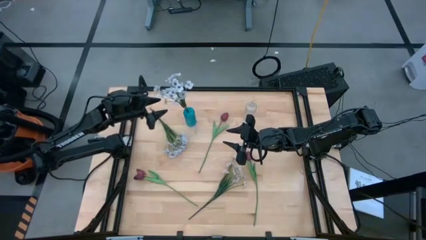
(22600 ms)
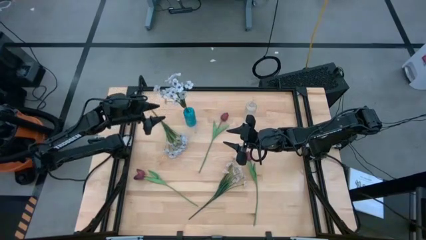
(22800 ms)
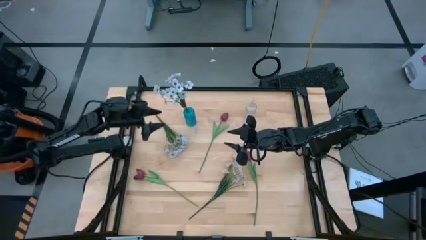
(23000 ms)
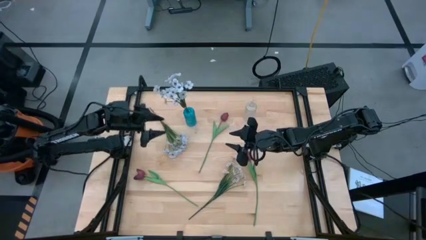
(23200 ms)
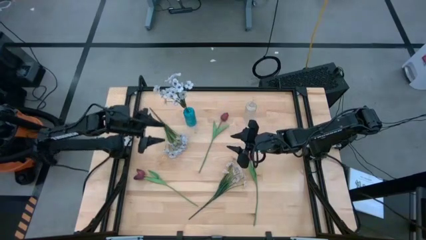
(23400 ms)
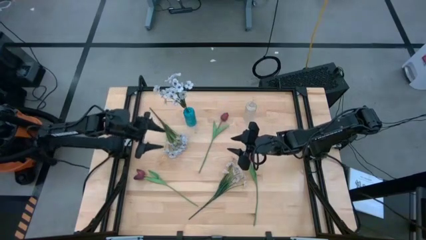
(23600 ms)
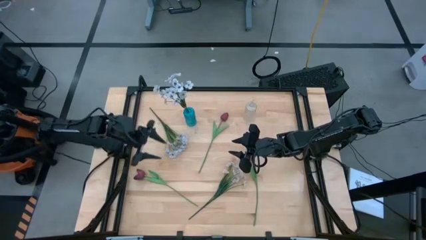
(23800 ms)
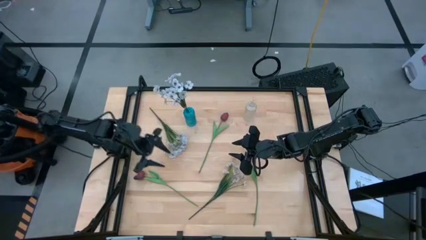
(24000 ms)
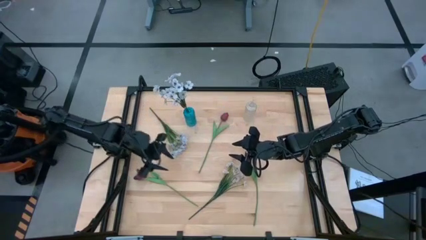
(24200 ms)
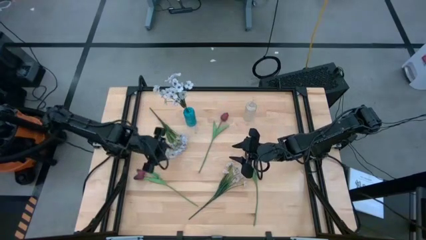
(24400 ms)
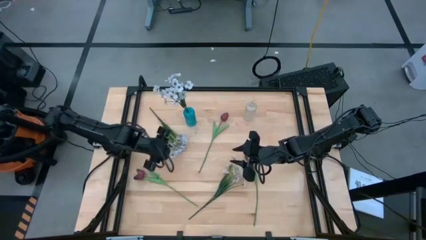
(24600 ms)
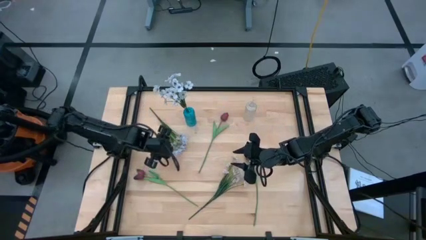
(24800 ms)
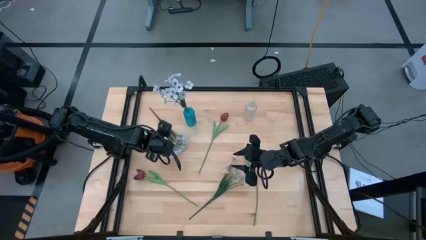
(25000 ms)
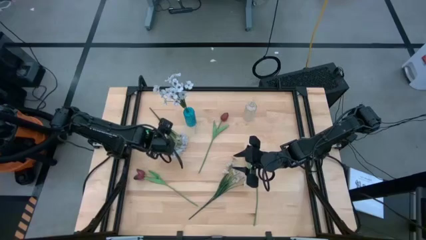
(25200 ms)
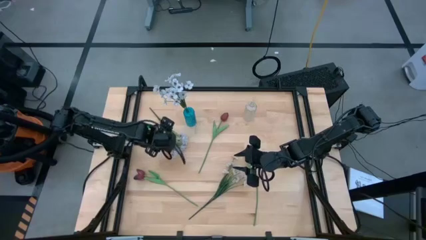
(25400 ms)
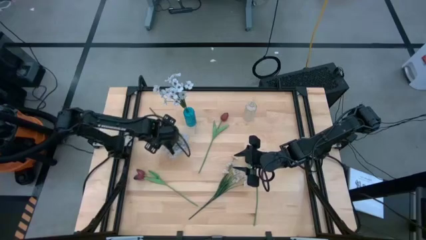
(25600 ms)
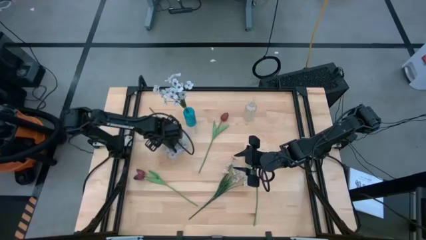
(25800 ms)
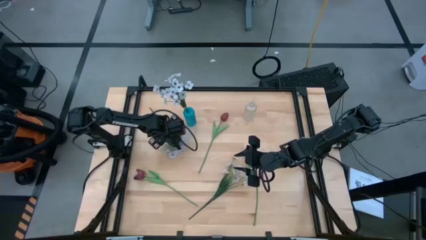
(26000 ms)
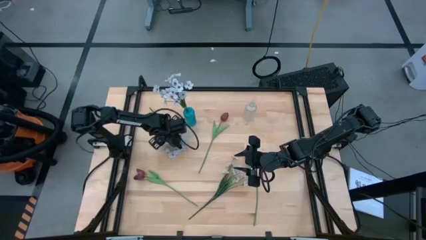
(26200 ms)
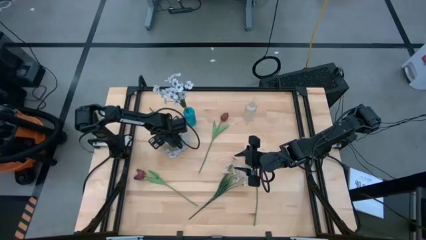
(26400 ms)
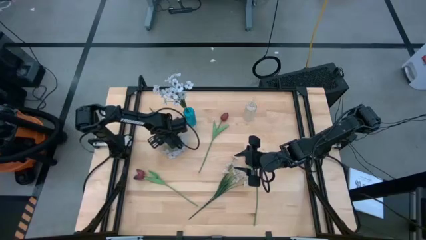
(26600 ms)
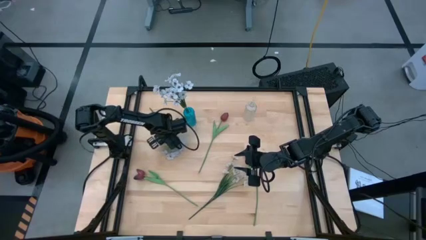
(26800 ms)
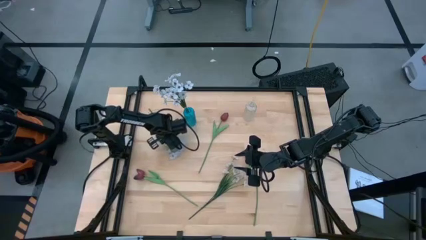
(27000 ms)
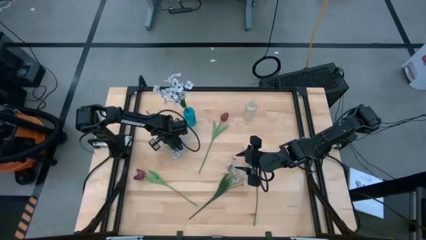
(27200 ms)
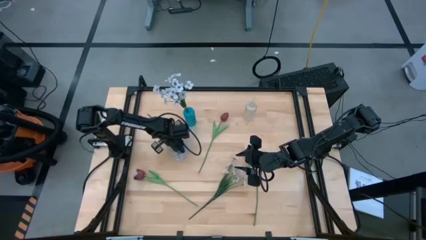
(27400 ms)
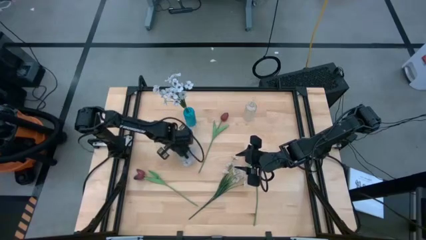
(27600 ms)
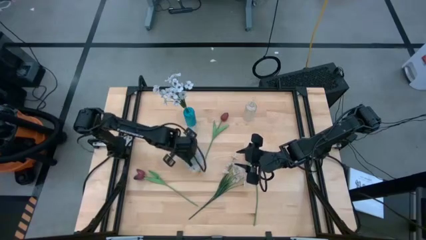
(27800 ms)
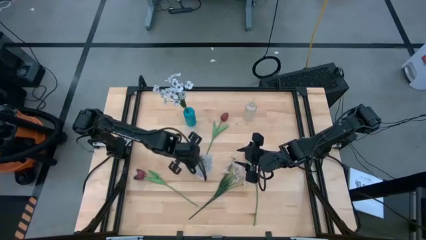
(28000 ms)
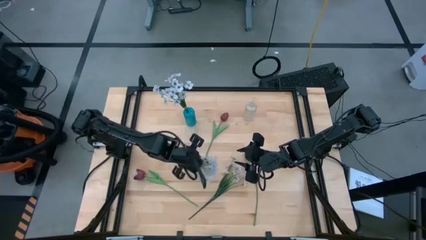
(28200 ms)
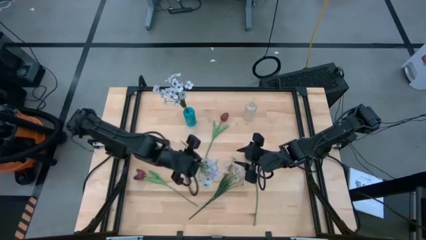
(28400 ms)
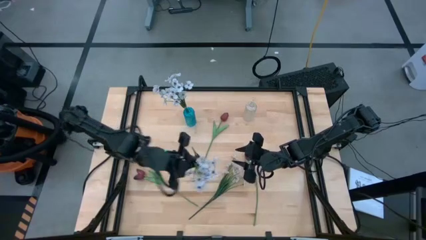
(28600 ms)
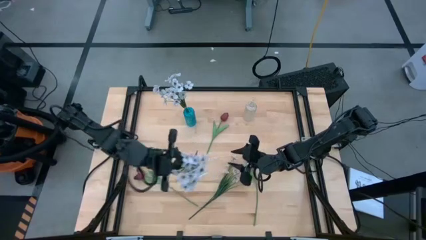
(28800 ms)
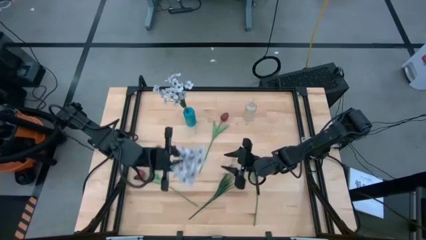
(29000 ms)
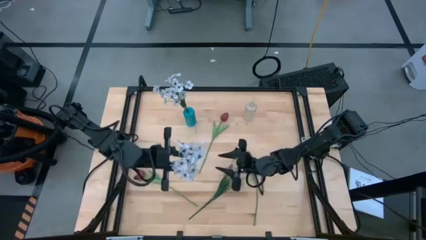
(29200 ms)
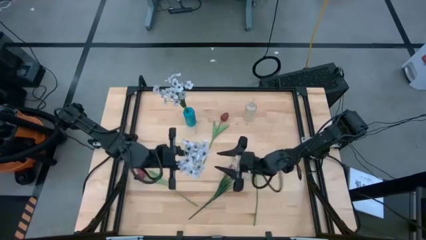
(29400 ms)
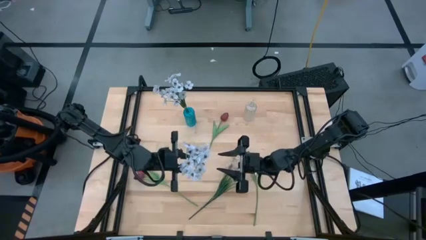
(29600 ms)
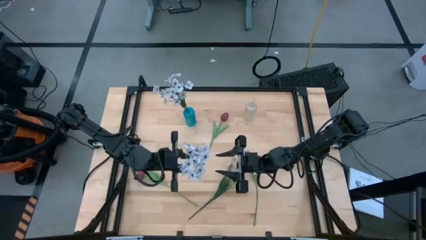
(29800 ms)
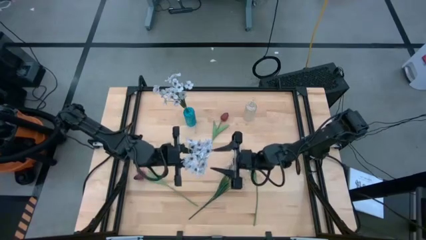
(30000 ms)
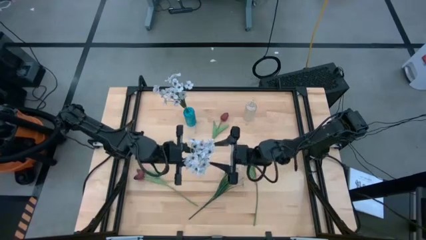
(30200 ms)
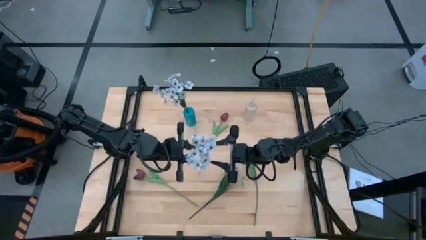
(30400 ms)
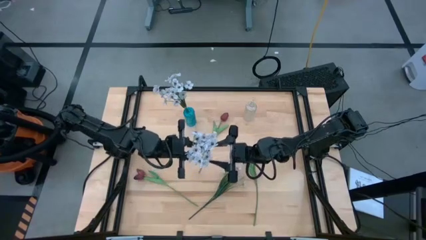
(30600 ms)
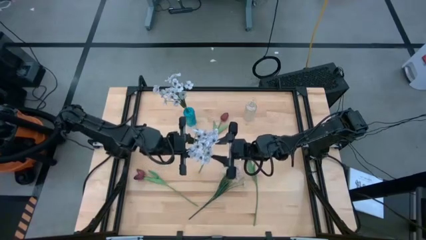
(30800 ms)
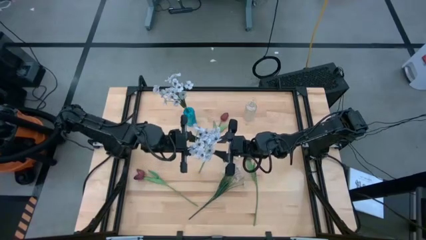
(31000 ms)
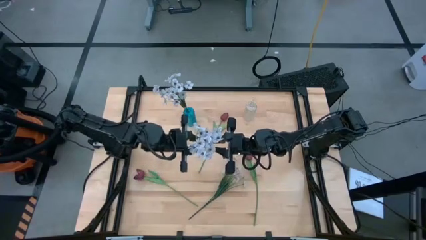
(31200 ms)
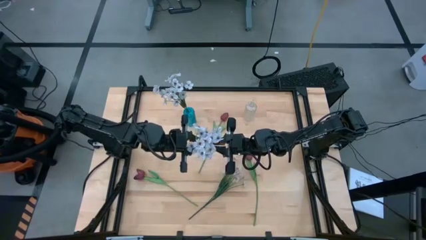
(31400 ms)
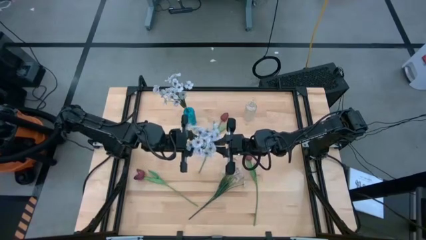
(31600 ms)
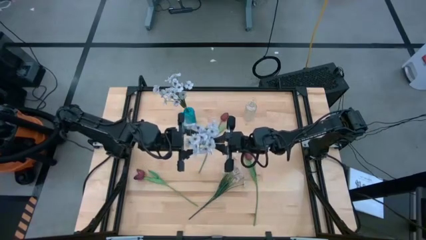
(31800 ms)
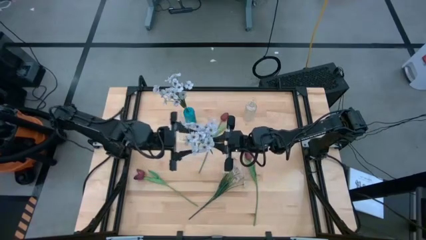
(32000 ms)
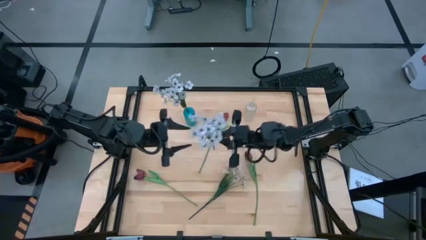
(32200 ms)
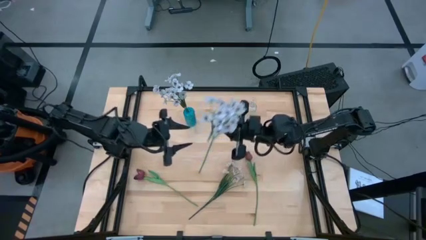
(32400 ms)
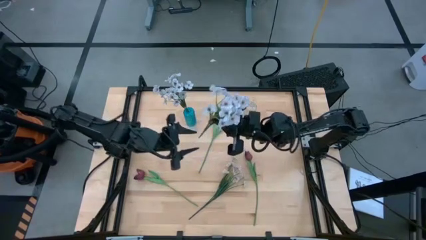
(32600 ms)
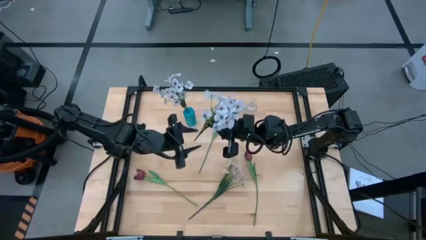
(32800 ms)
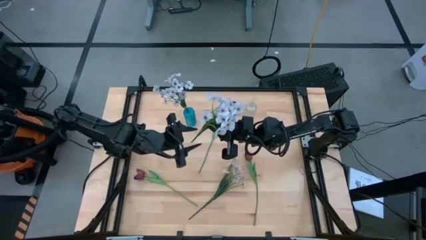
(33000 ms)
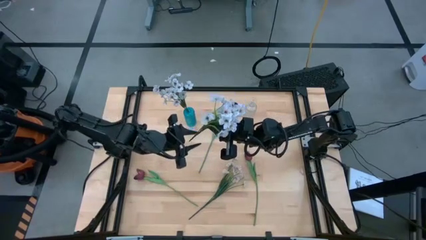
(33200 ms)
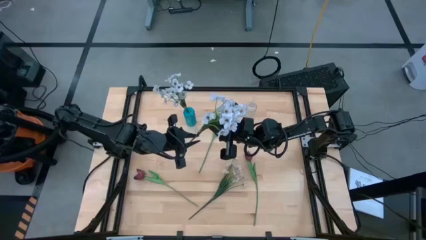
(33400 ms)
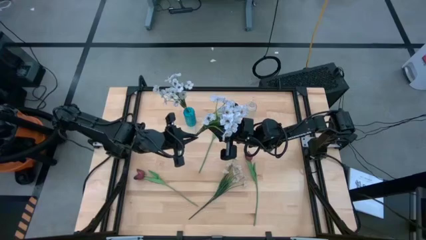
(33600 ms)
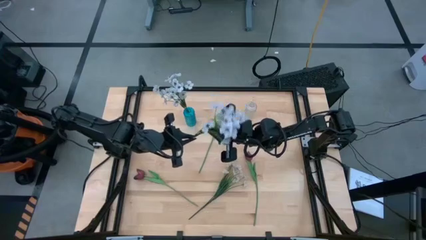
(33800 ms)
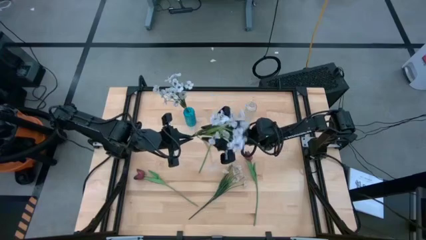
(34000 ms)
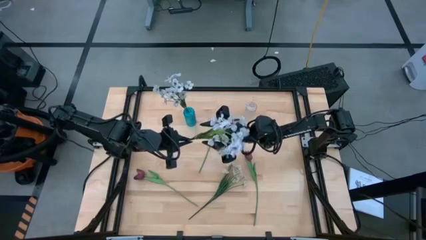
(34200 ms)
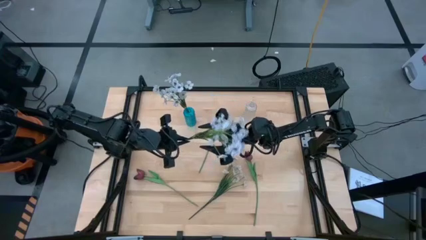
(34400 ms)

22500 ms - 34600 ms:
Task: Sort flowers into vase by color
Put the top white flowers into the blue vase

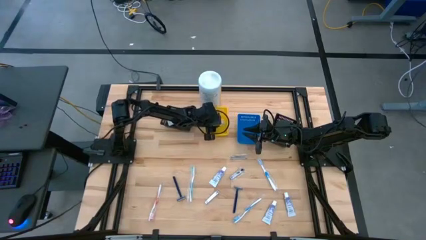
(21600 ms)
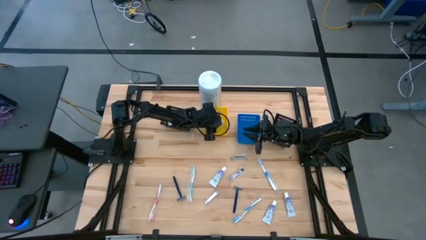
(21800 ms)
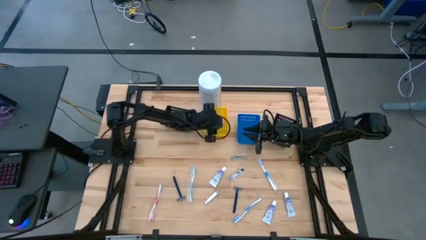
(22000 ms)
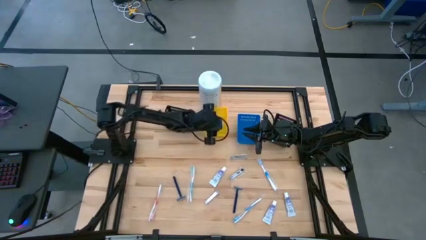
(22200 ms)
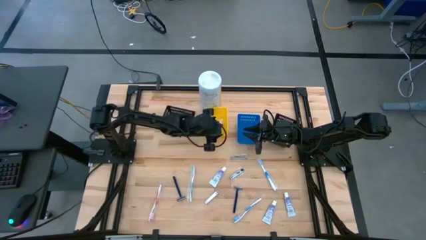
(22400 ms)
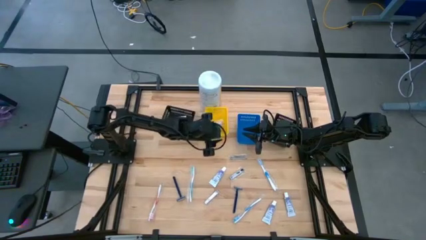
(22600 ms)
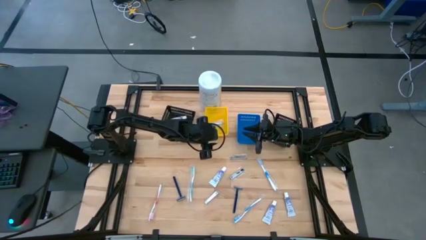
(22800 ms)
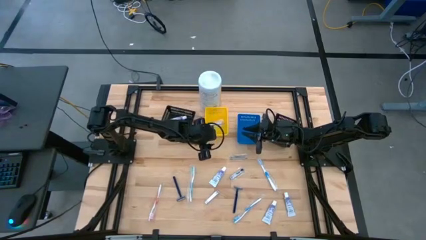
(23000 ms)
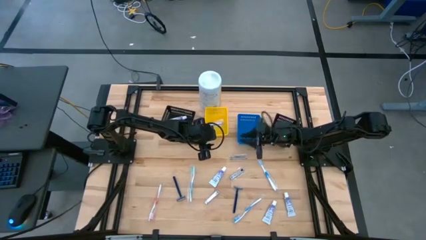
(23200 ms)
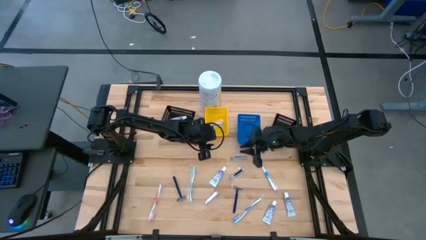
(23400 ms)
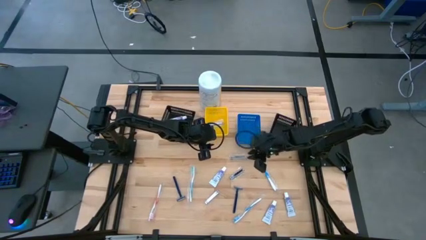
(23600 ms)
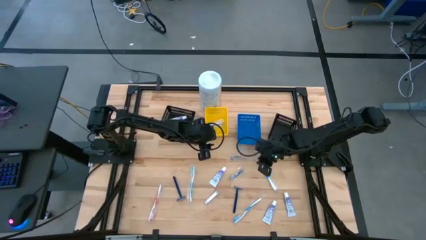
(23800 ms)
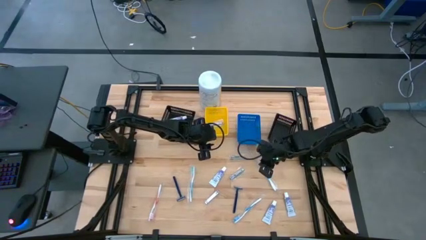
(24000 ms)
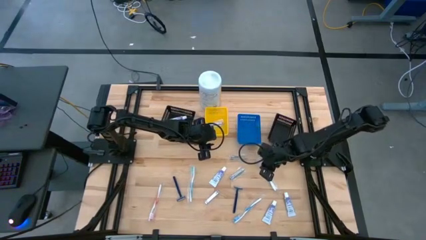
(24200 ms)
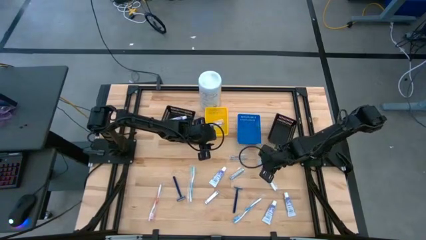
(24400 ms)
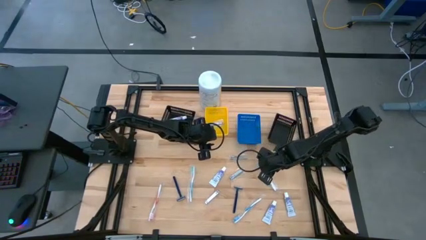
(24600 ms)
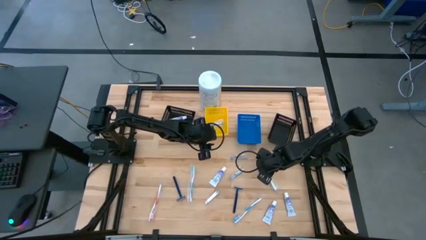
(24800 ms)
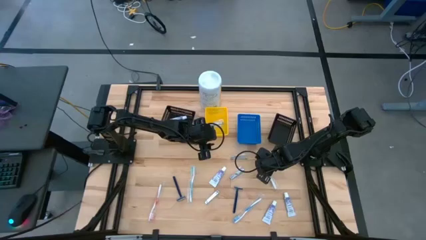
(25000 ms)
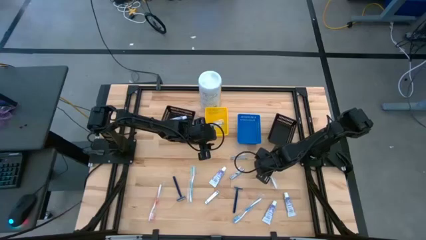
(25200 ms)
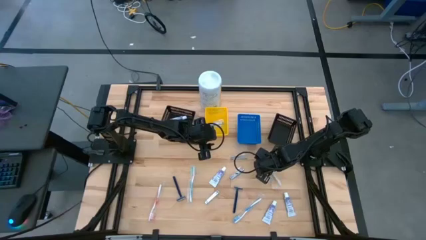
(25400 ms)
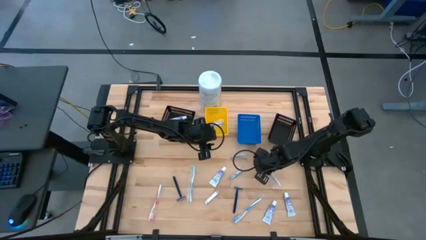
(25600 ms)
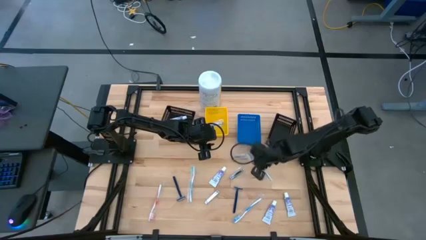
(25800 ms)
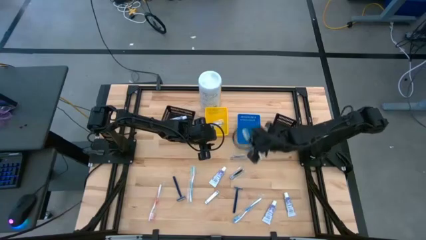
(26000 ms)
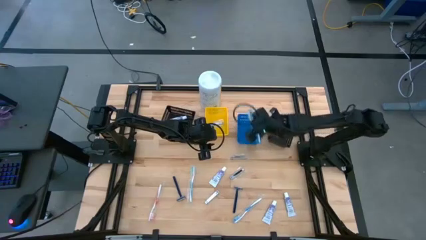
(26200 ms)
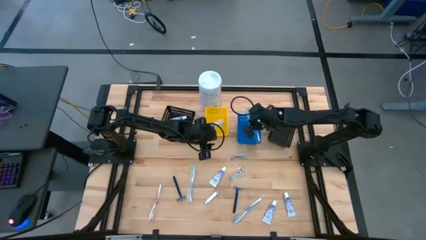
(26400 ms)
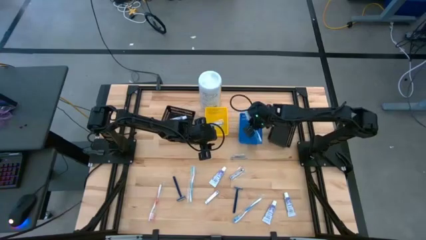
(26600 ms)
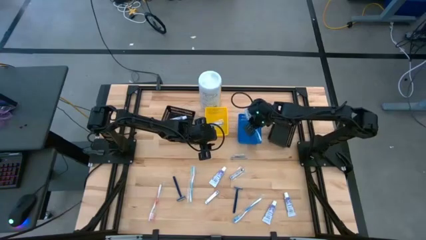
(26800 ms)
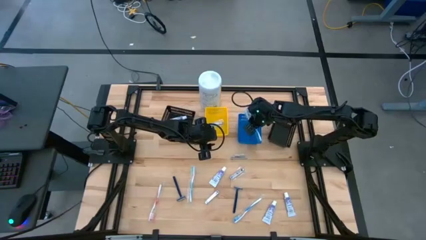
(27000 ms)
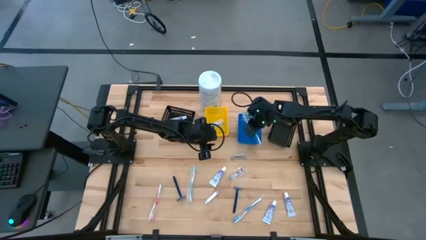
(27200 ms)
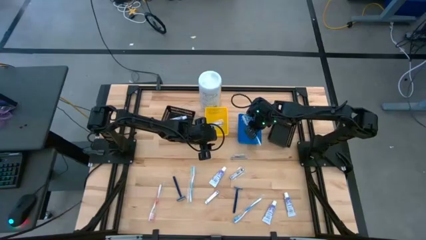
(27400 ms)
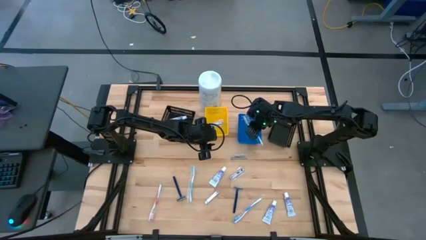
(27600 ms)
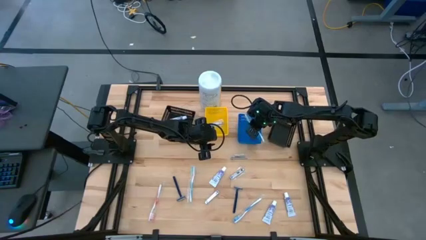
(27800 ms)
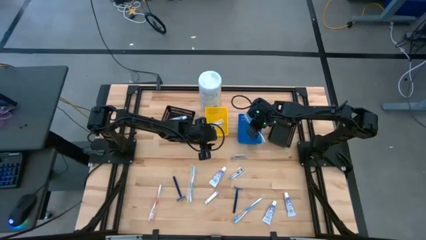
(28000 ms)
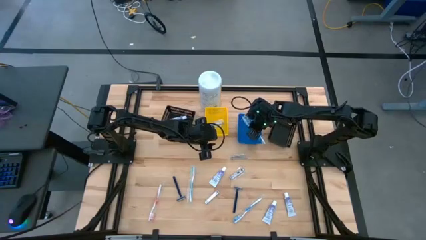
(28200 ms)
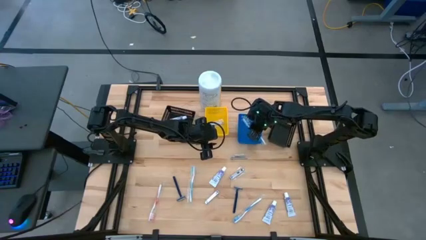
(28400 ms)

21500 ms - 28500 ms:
Task: Pick & Place Travel size toiletries
Put the top blue toothbrush into the blue bin
